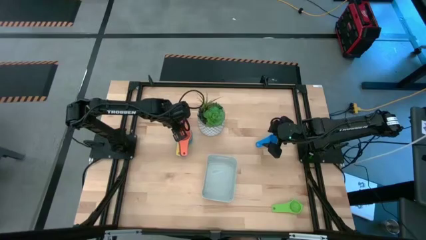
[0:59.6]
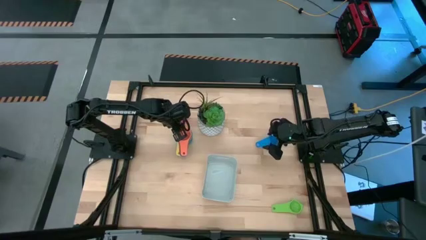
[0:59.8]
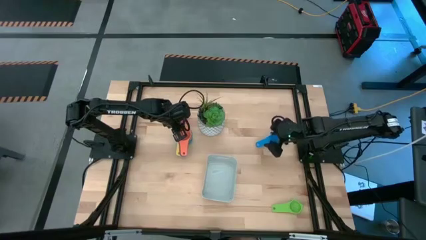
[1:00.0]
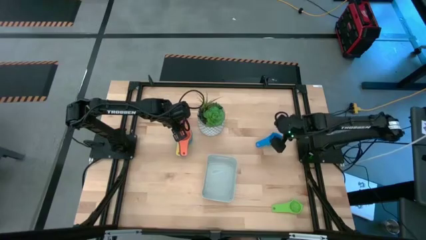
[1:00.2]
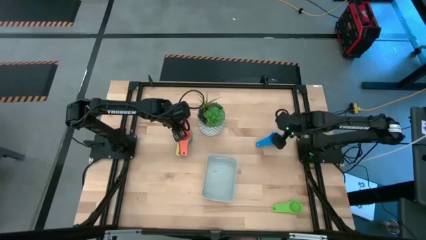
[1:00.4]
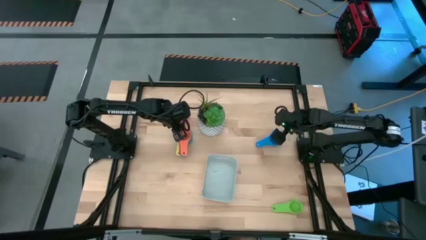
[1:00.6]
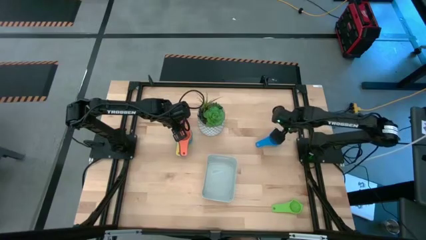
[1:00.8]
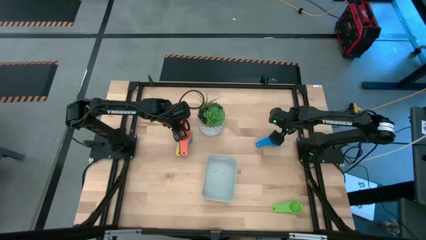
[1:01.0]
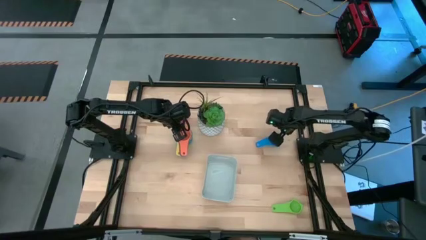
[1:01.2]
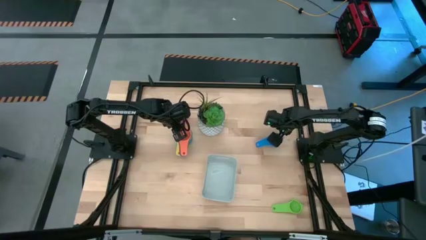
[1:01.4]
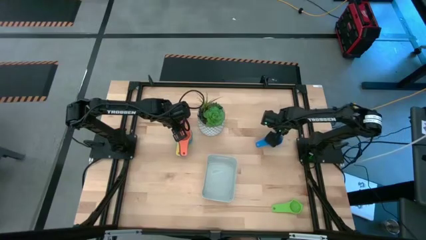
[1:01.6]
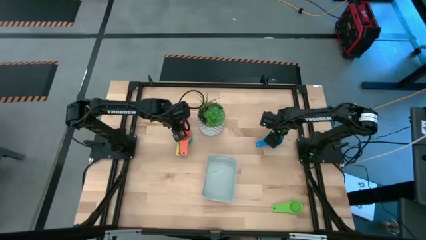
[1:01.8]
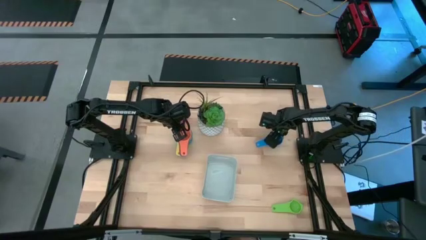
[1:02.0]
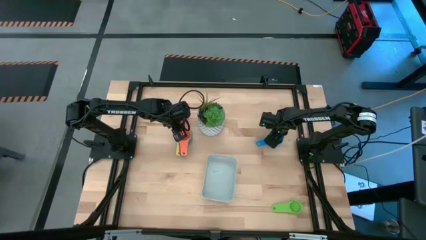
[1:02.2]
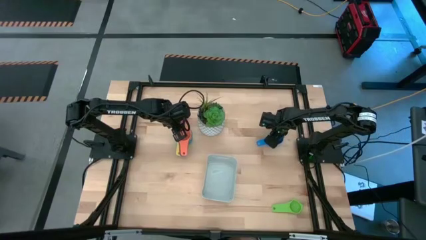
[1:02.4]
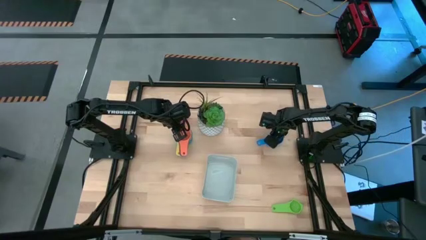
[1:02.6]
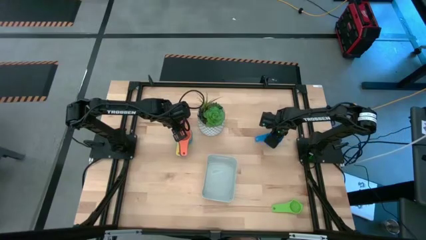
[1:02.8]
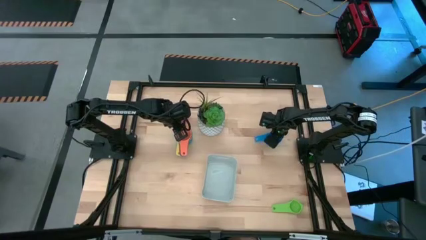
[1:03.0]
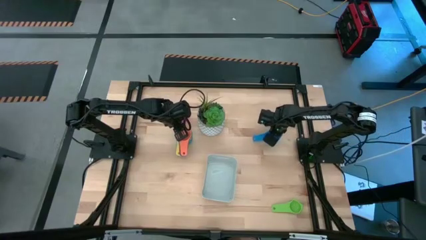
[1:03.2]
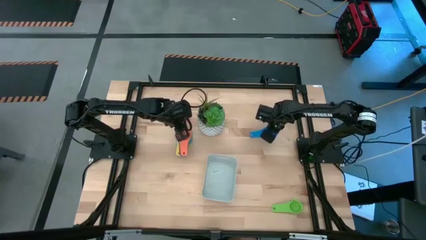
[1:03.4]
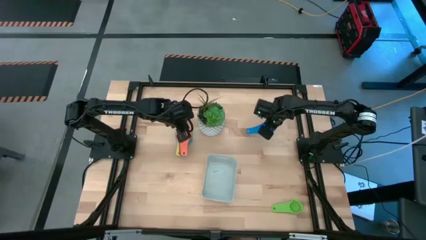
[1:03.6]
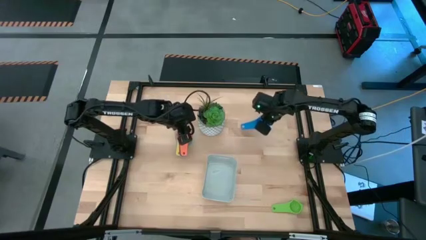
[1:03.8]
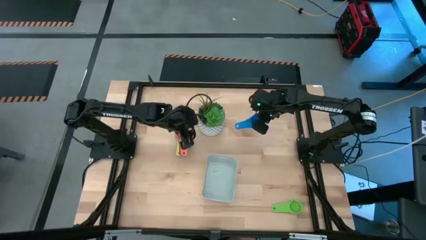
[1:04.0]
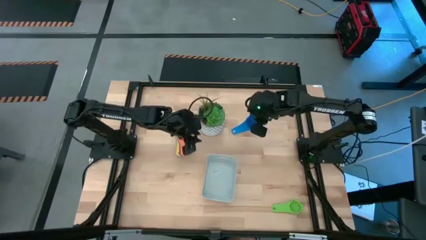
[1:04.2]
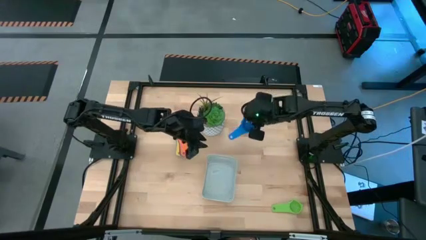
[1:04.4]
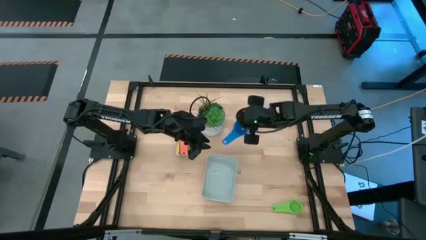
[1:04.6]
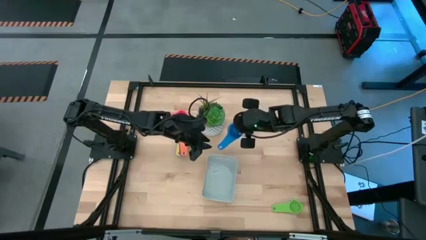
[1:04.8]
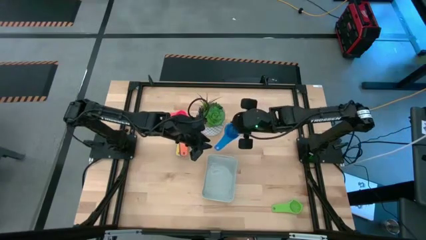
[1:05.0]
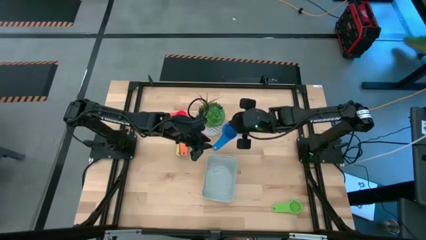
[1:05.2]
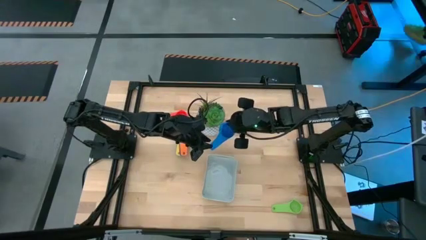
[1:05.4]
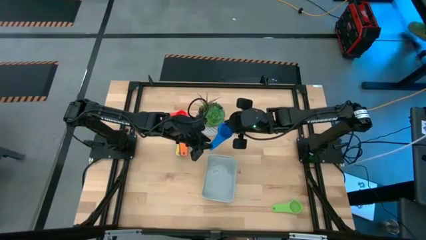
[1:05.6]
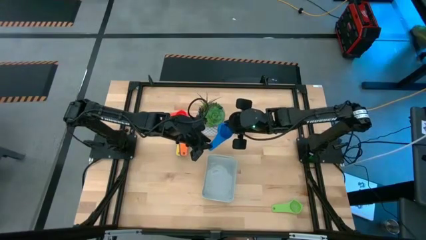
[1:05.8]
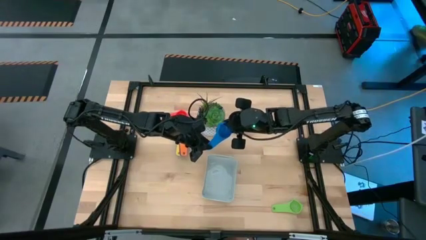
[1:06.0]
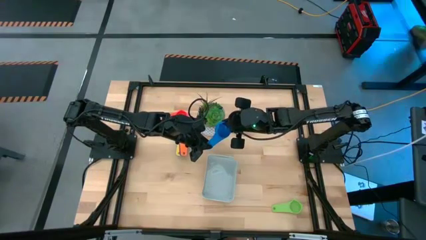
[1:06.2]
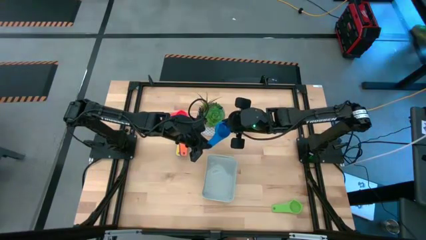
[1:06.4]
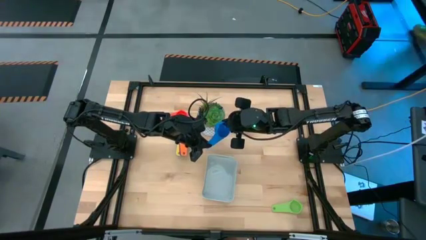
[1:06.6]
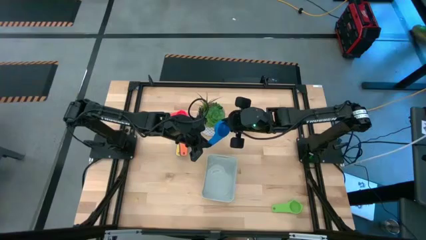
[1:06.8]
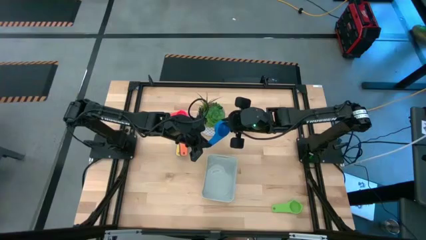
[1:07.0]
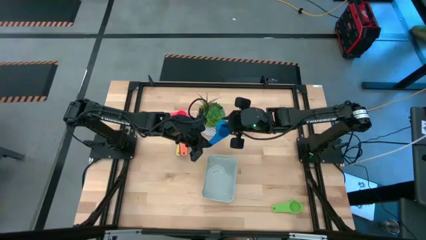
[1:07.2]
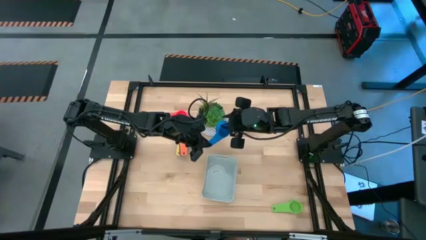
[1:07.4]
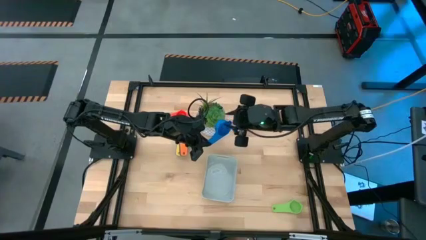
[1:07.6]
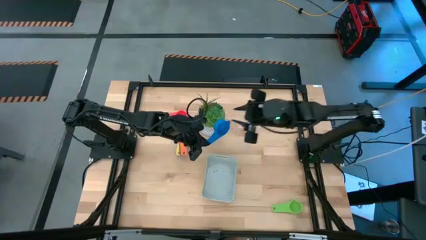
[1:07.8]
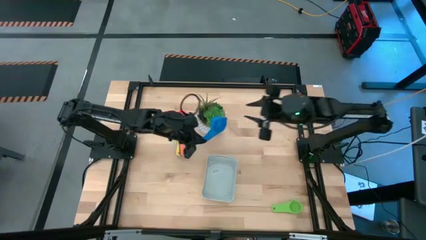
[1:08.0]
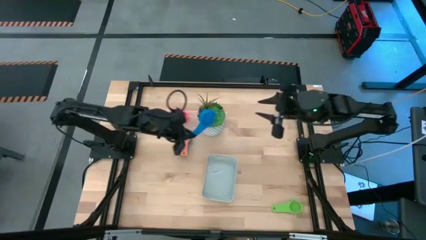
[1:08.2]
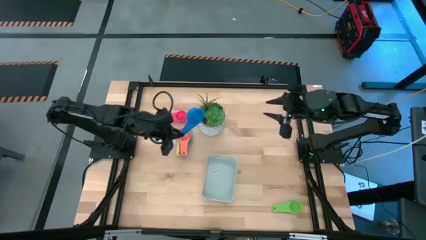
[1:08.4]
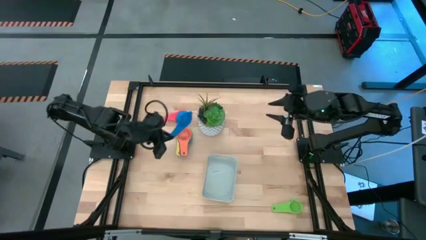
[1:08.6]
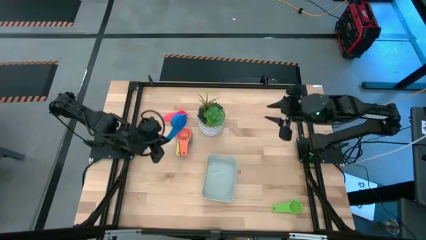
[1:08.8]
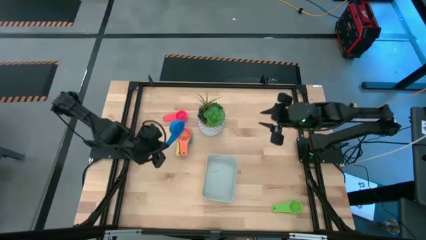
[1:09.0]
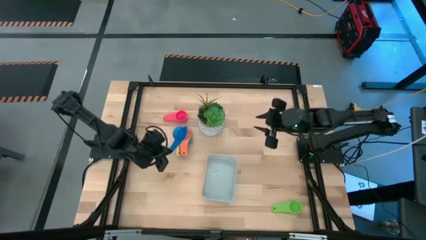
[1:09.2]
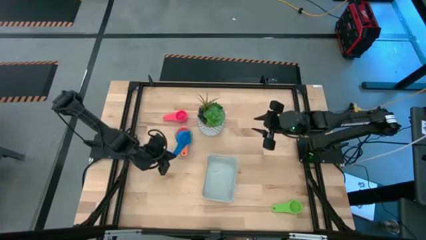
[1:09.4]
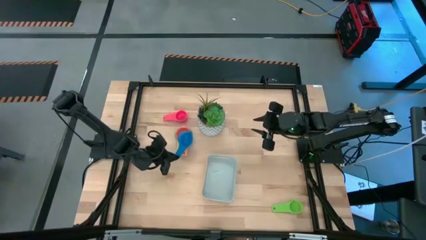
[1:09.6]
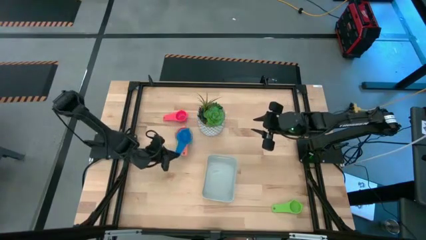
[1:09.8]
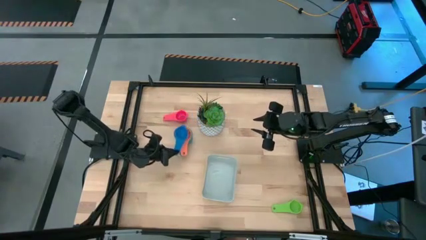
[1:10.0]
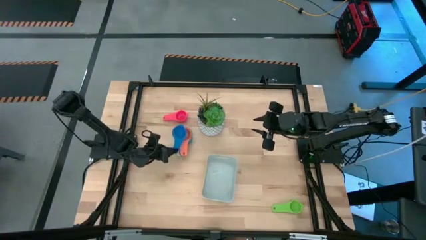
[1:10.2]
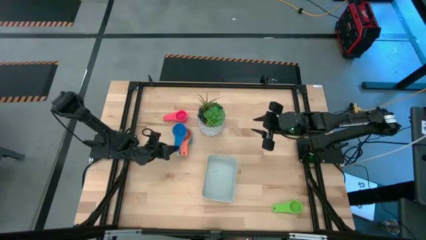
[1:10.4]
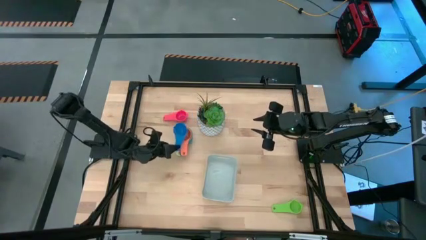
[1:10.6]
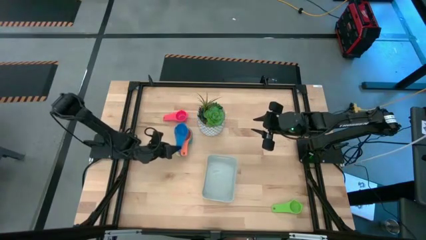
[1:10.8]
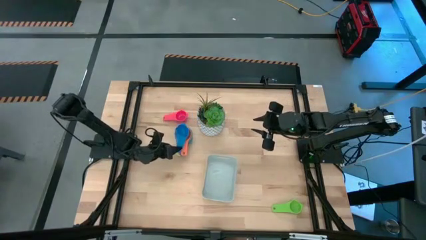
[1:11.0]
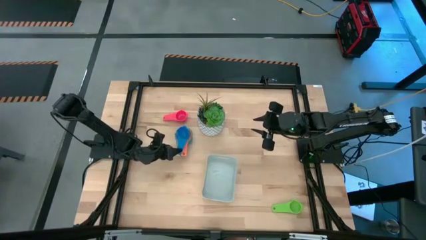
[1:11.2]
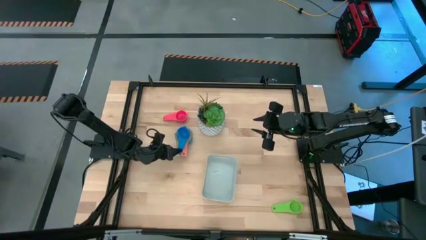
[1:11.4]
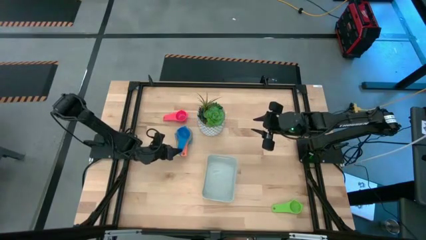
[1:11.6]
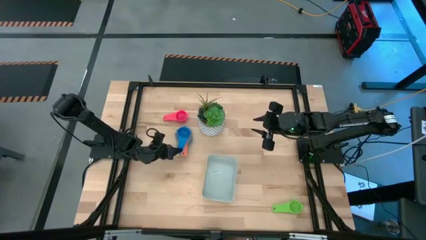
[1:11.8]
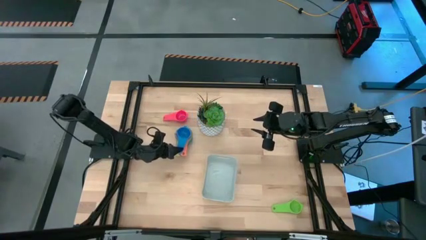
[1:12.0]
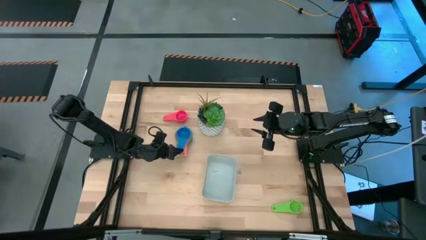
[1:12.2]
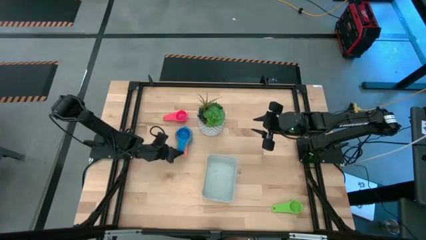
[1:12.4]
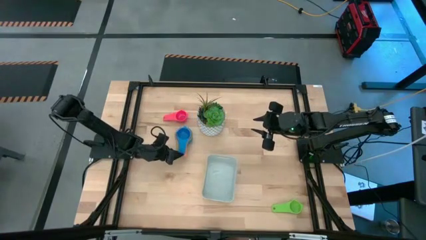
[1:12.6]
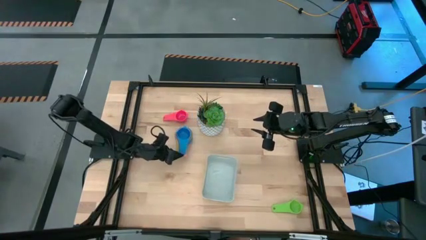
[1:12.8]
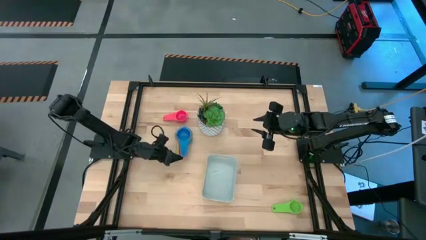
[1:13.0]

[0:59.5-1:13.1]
Task: Nest measuring cups in basket
Stack the blue measuring cup on top of the orange measuring cup
